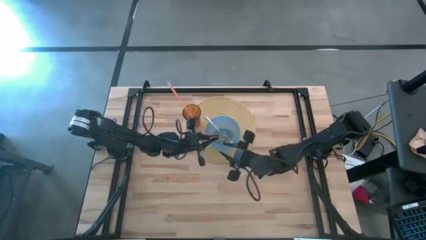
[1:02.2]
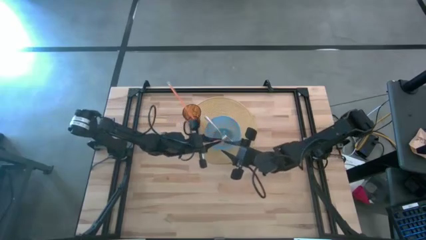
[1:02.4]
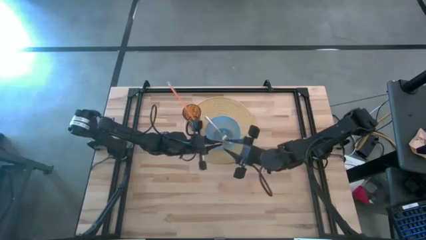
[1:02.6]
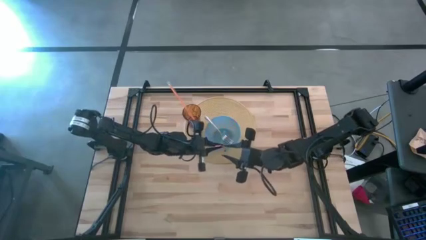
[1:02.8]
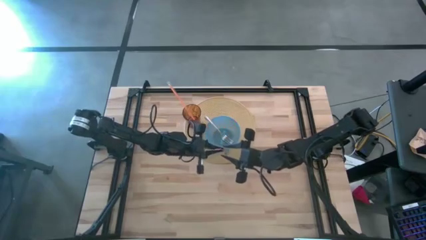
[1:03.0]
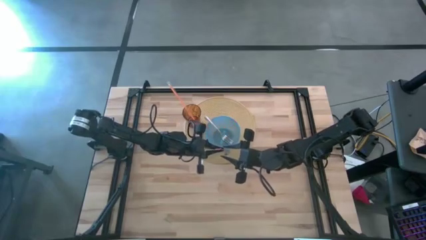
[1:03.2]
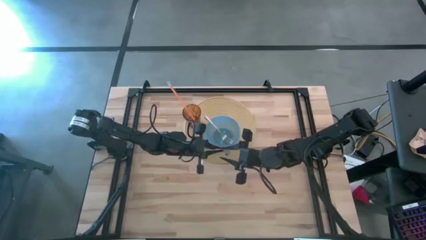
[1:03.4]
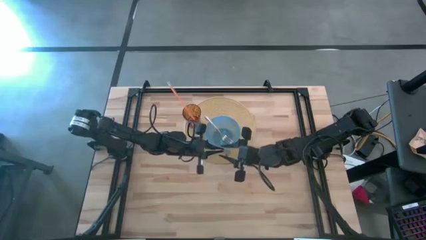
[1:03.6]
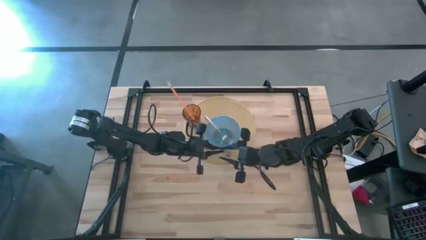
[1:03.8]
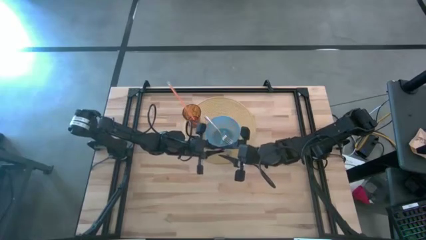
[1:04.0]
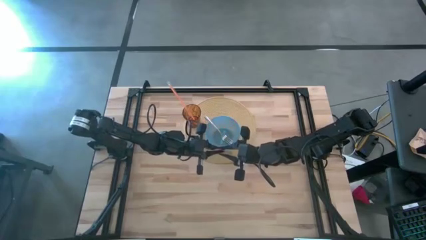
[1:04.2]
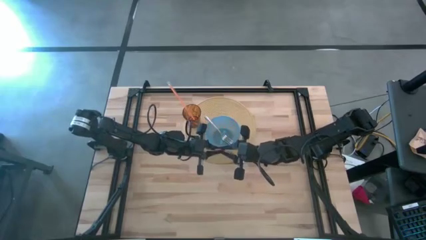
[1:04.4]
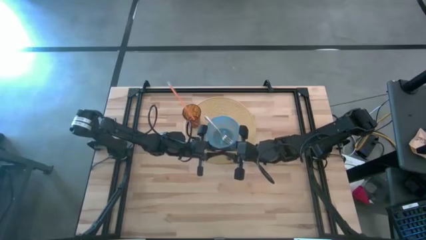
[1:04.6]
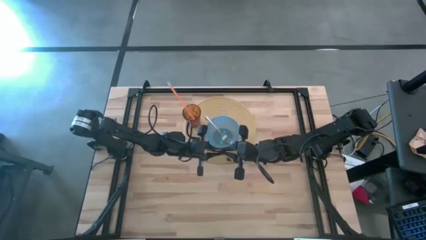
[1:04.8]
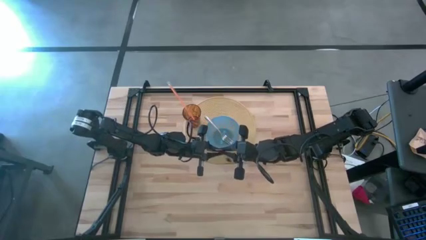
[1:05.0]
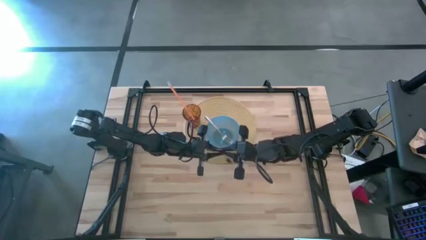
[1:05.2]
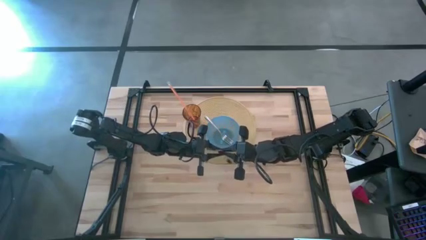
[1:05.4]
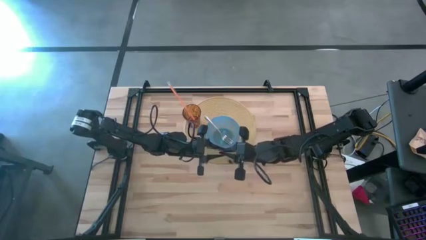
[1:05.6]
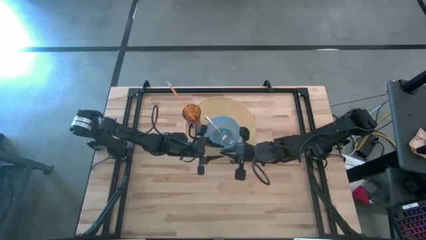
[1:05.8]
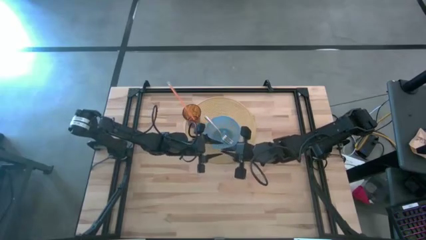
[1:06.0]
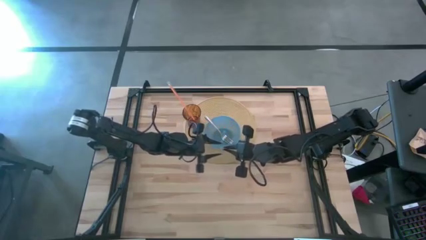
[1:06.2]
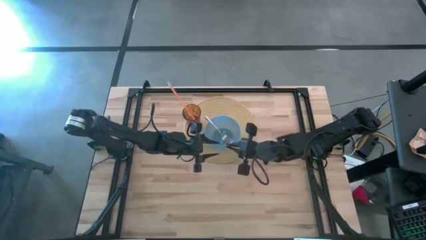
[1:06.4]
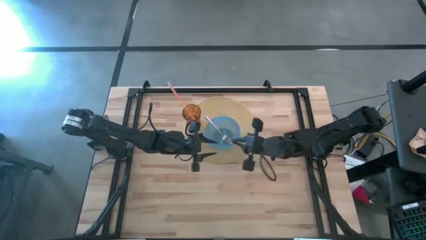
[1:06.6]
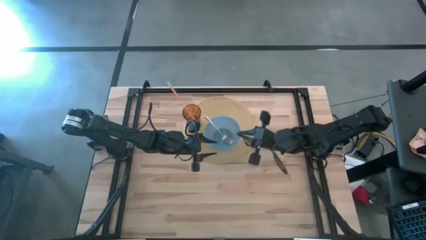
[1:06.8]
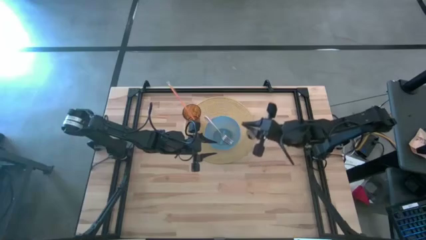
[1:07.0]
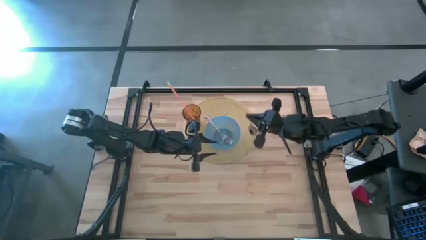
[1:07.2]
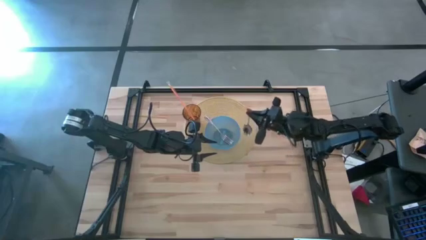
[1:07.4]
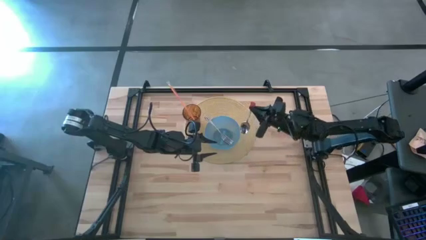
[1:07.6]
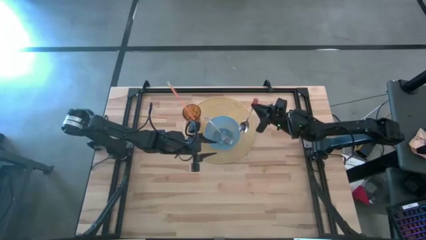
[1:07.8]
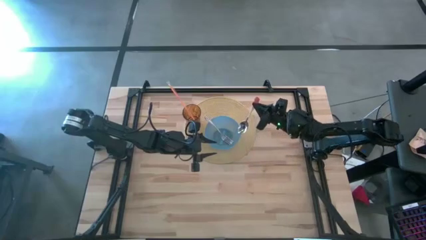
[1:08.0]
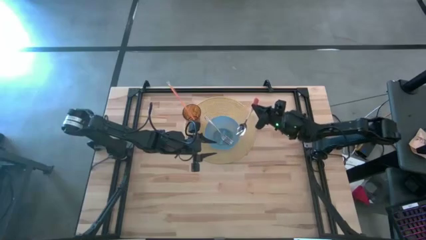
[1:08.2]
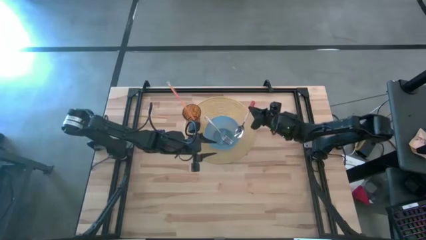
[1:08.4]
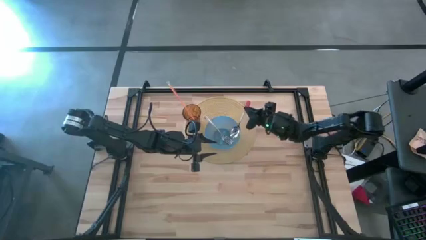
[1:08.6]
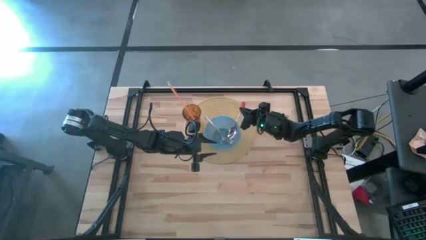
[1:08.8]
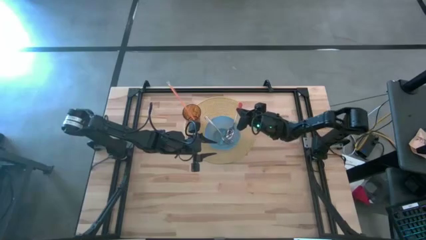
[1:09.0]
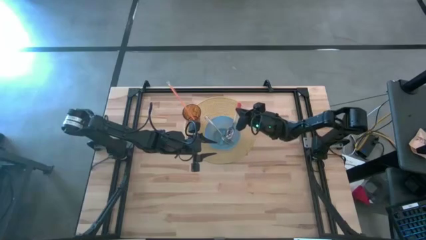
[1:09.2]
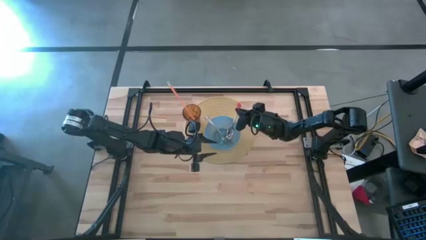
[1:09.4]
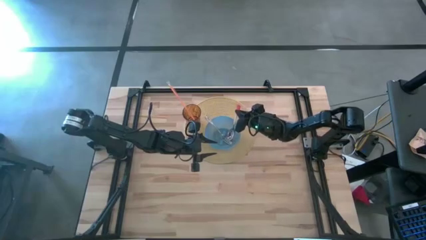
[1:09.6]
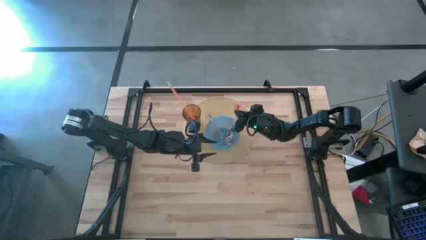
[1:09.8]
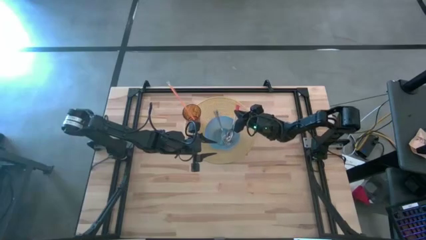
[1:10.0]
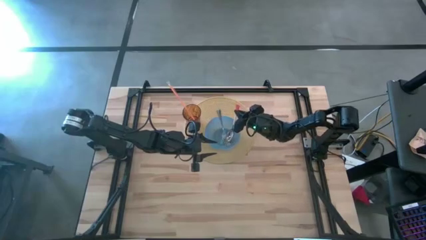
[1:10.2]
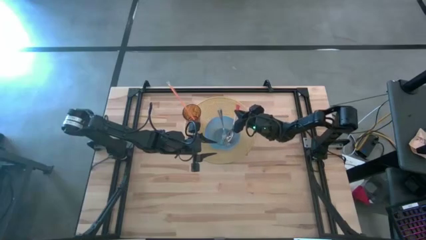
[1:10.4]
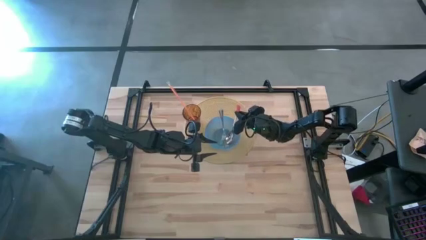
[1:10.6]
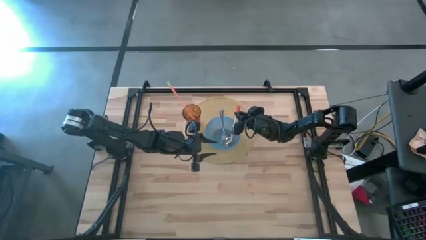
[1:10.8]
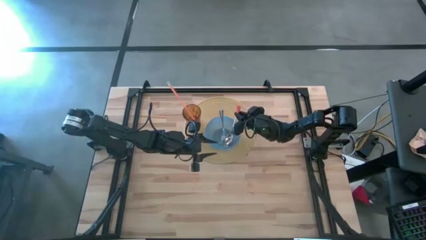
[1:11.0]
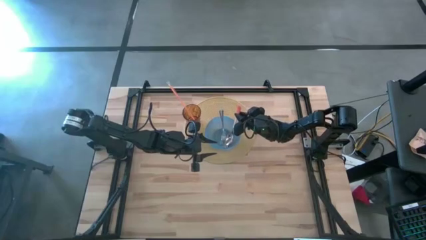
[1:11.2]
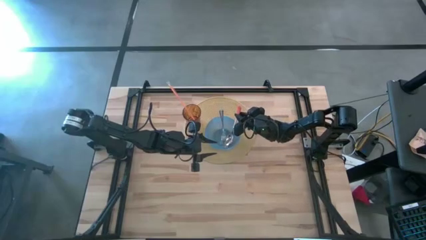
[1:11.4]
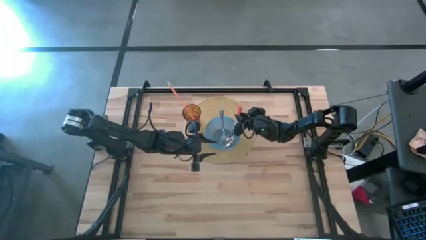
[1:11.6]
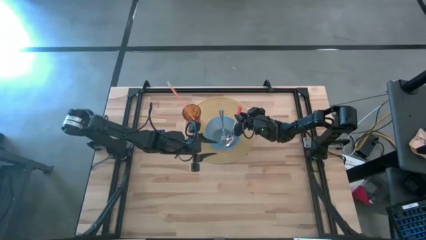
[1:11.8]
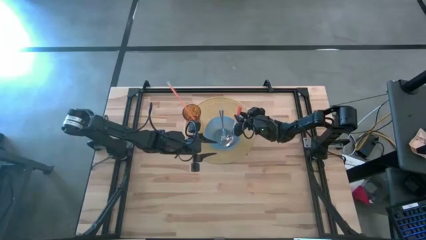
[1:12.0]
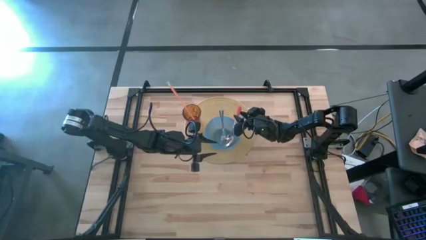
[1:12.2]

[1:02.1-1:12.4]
Task: Pick & Place Utensil
Put the orange spoon into the blue bowl on the brown mat

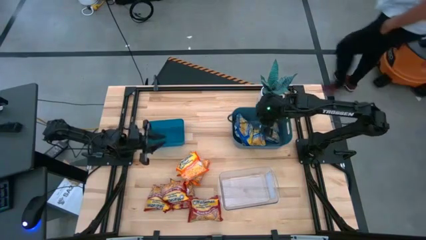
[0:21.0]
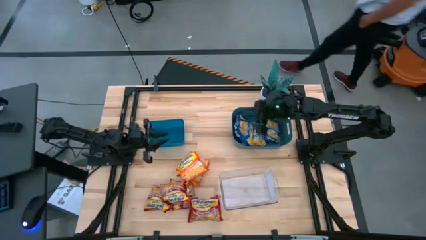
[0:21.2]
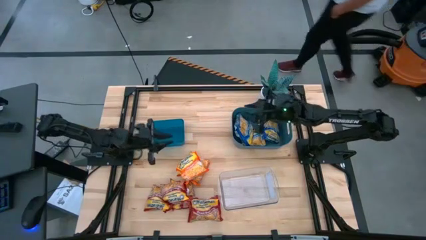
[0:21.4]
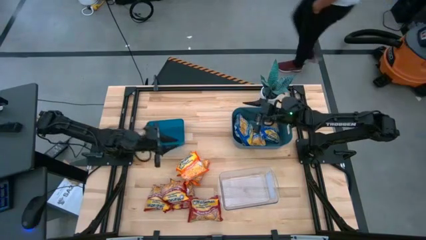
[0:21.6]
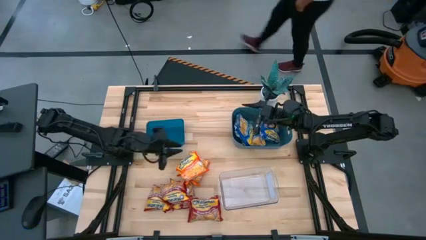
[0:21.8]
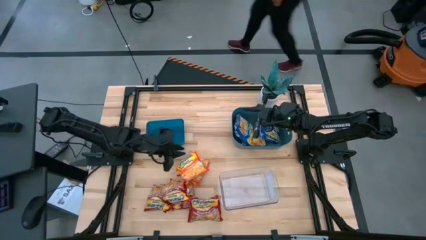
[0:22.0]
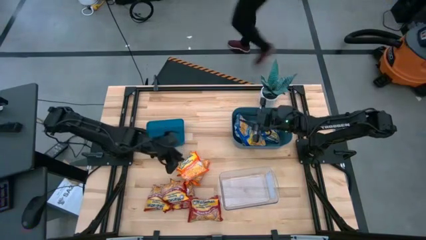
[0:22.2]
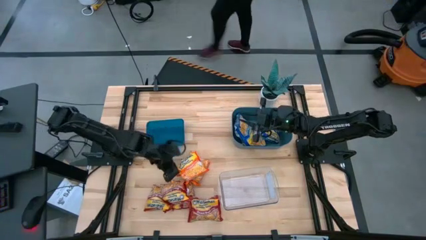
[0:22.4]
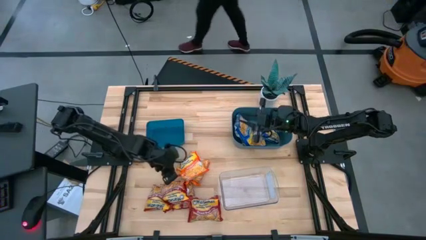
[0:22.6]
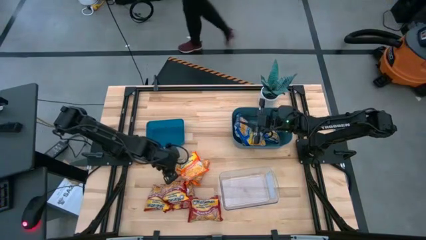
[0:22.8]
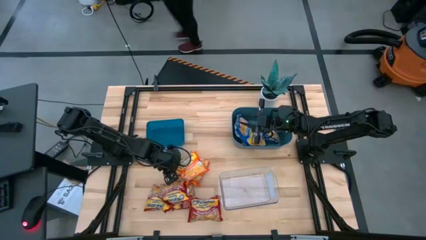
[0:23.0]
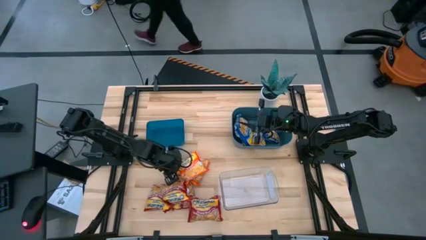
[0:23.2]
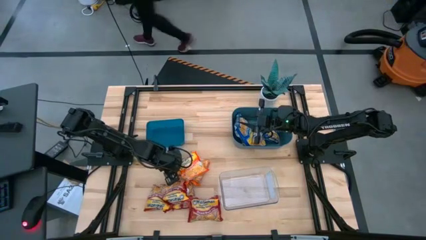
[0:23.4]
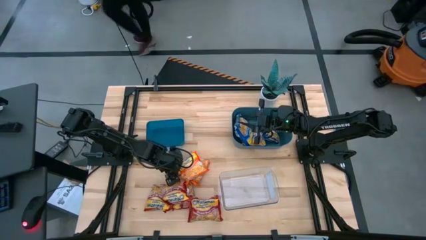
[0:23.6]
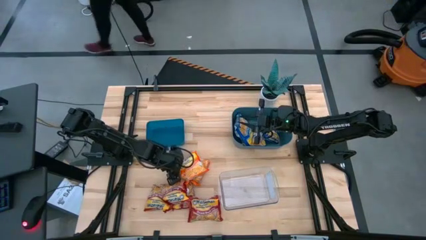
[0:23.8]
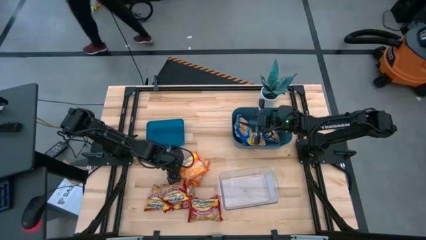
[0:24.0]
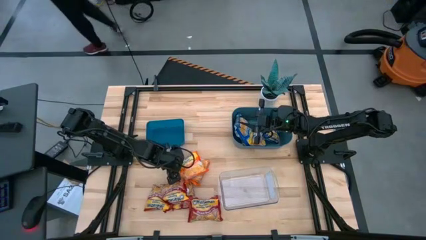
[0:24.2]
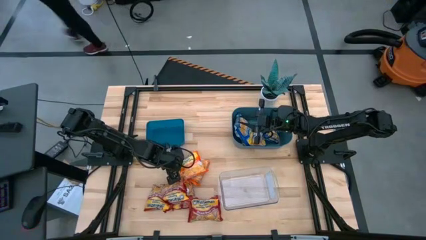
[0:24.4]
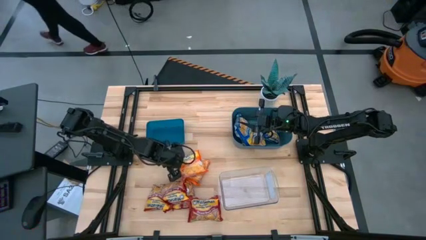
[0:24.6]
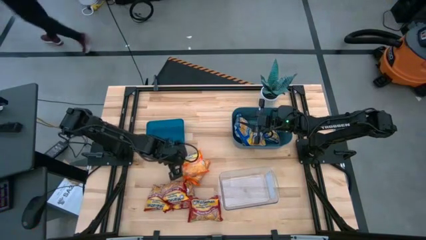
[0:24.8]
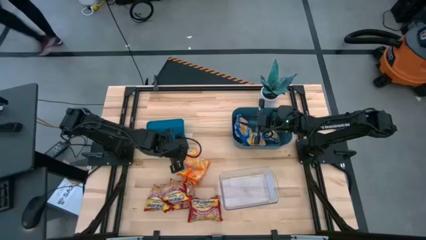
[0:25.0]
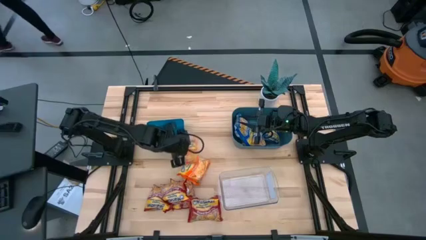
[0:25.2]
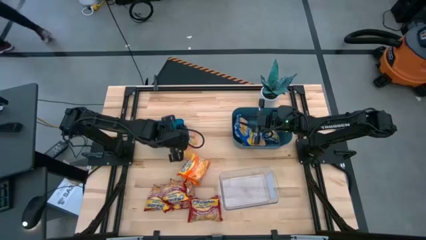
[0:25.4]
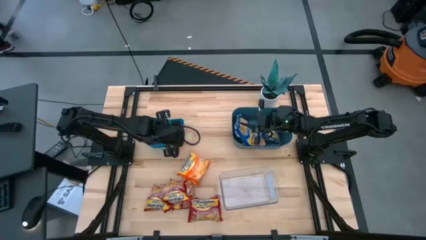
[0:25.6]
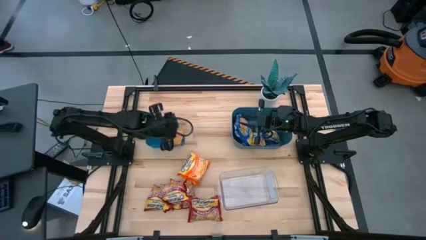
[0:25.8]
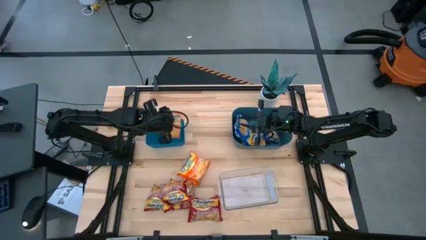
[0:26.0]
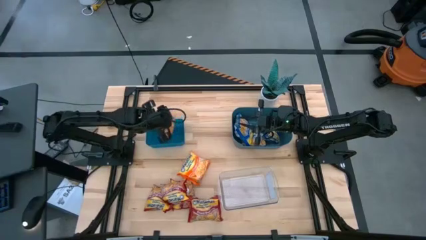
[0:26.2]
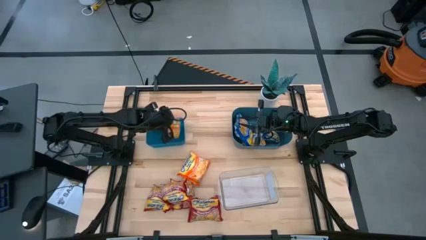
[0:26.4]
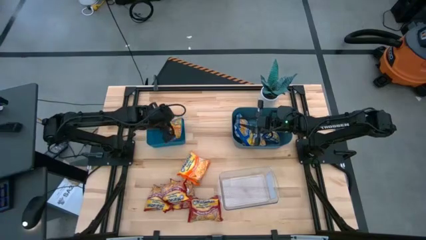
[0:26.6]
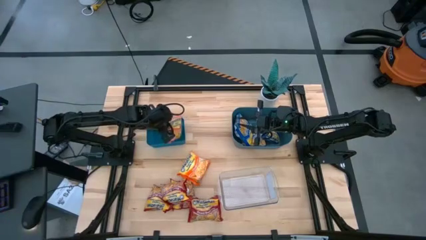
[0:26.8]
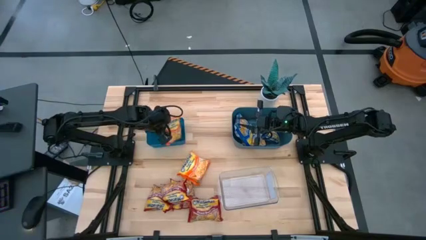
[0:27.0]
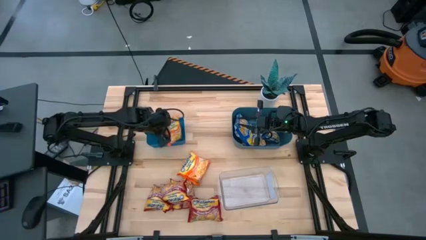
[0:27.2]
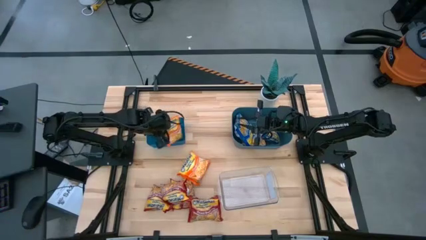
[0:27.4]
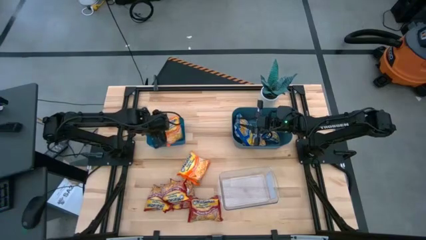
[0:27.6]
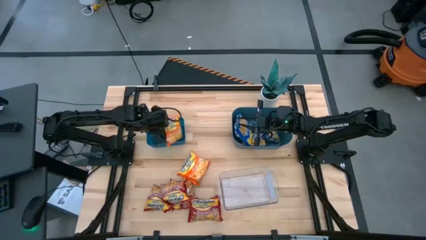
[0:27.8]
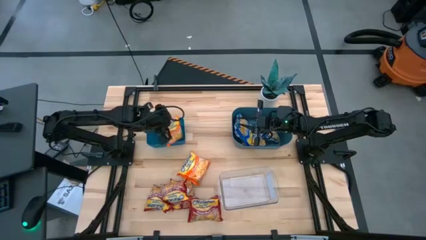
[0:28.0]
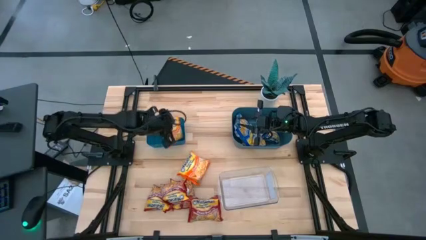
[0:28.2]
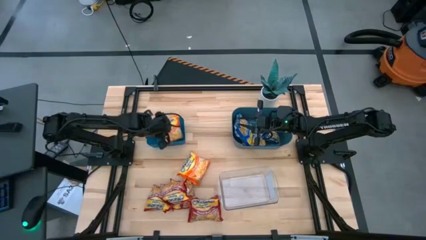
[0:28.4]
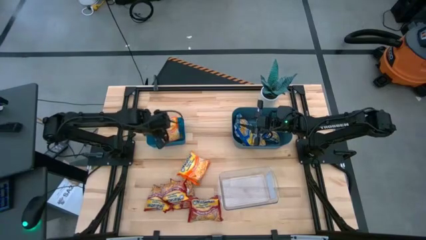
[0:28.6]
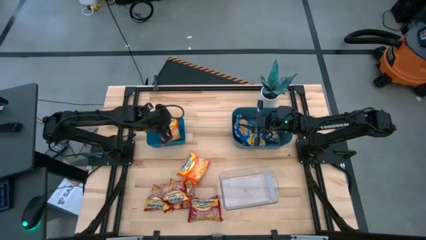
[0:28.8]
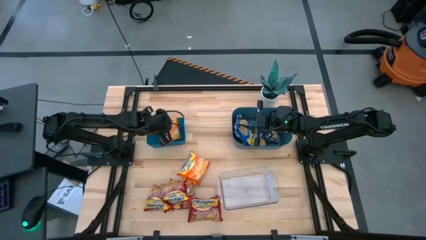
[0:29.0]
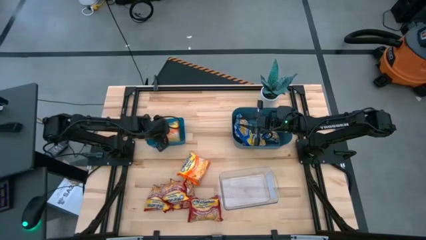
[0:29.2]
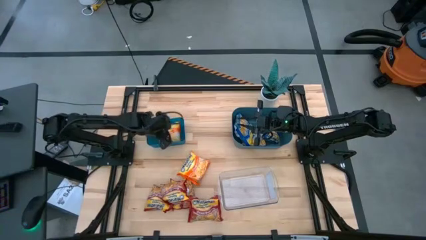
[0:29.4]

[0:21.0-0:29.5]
Task: Sort Maruchan noodles
Put the orange noodle pack into the blue bin
